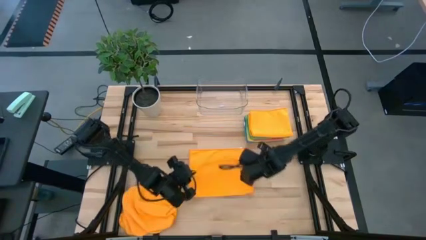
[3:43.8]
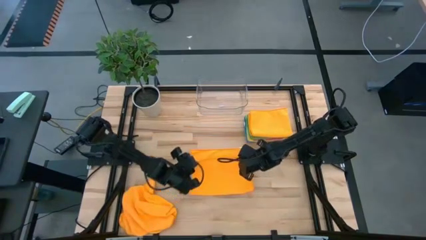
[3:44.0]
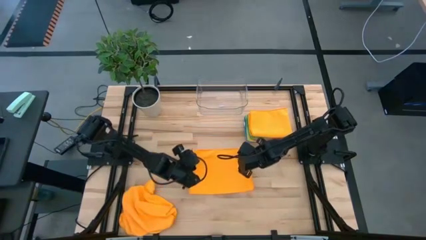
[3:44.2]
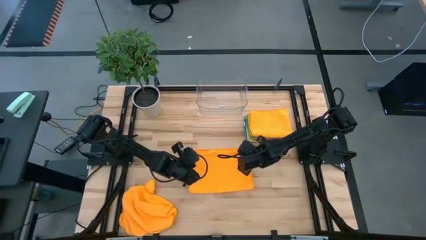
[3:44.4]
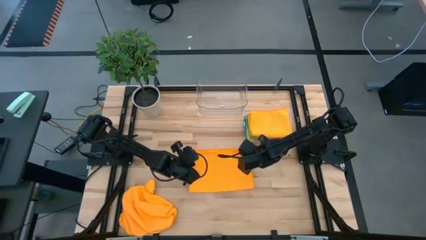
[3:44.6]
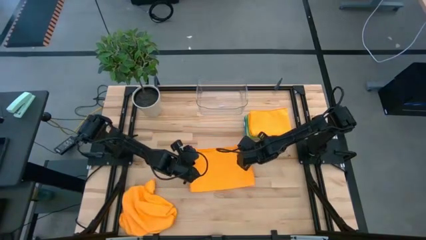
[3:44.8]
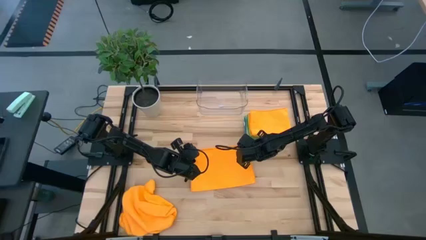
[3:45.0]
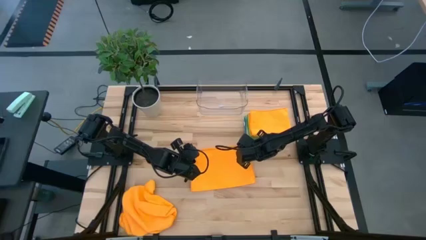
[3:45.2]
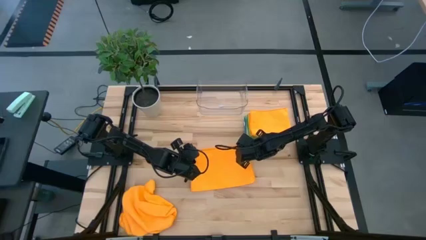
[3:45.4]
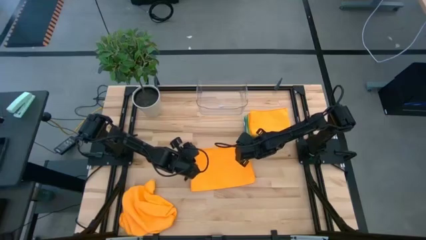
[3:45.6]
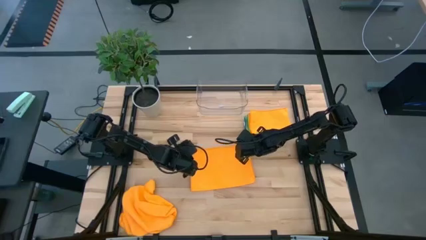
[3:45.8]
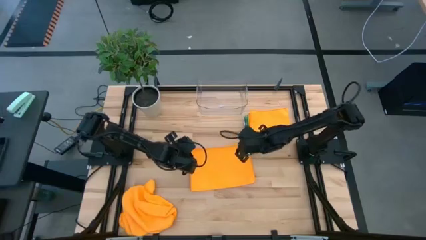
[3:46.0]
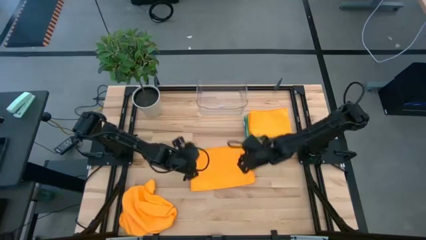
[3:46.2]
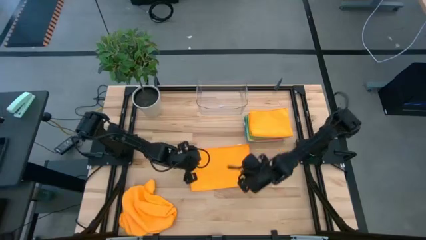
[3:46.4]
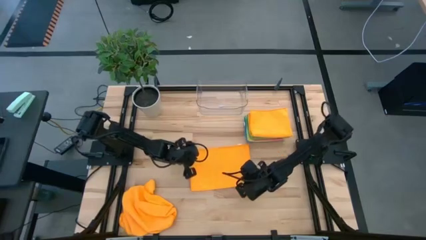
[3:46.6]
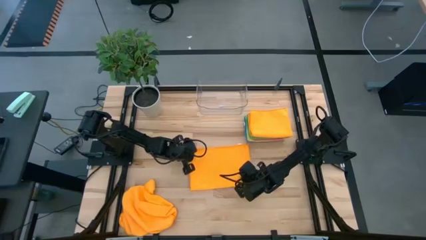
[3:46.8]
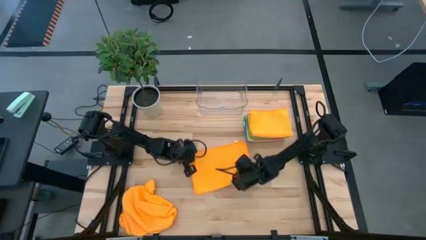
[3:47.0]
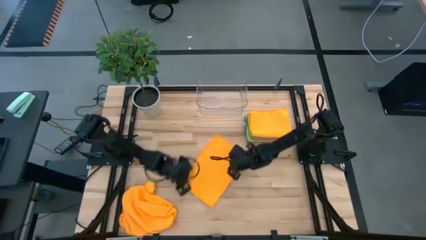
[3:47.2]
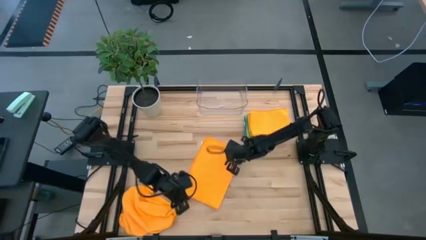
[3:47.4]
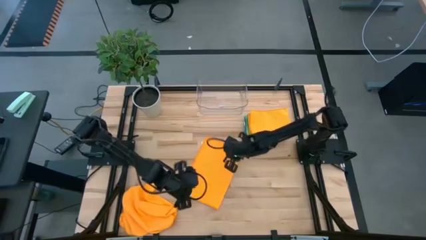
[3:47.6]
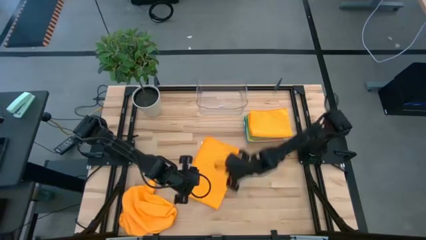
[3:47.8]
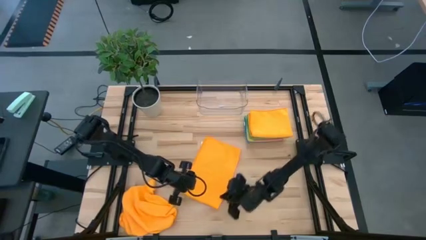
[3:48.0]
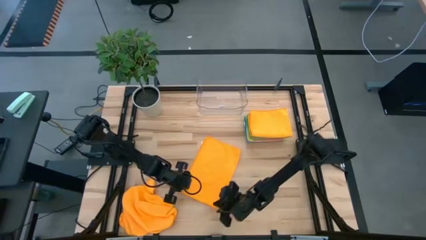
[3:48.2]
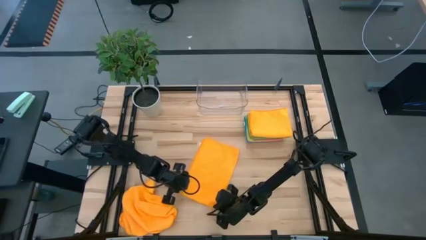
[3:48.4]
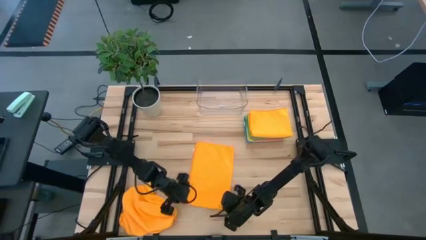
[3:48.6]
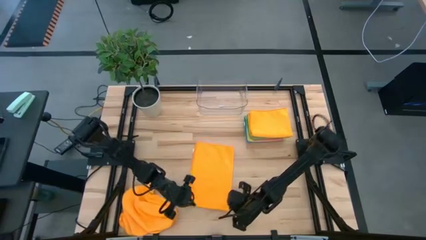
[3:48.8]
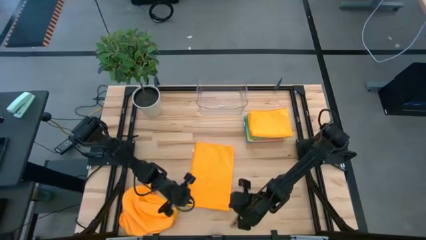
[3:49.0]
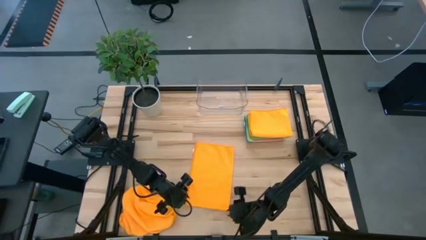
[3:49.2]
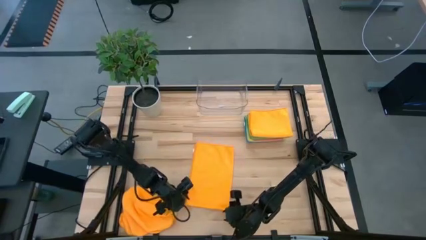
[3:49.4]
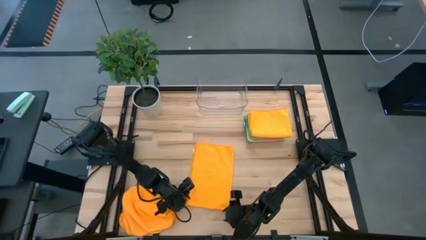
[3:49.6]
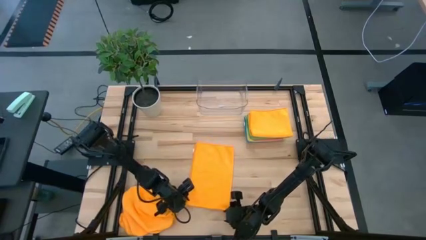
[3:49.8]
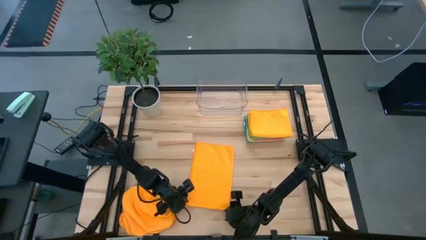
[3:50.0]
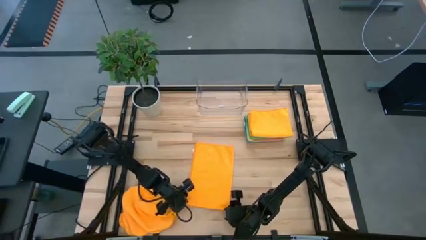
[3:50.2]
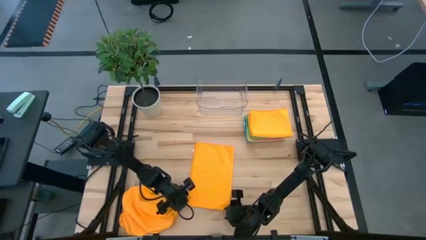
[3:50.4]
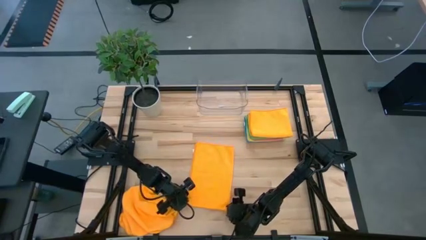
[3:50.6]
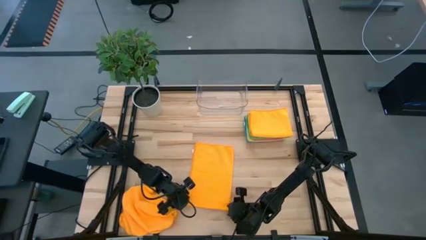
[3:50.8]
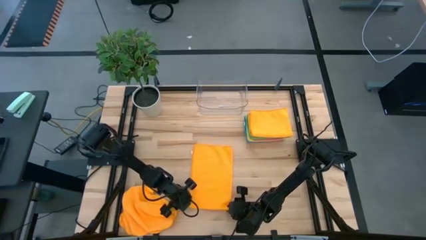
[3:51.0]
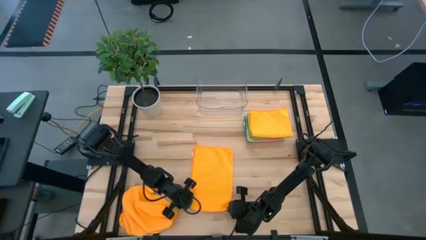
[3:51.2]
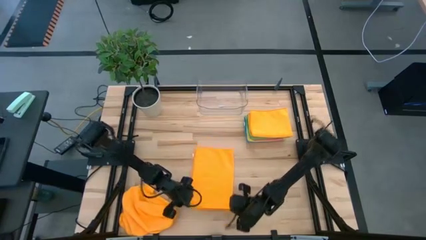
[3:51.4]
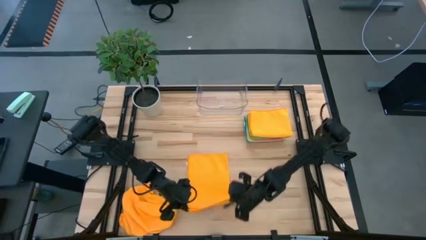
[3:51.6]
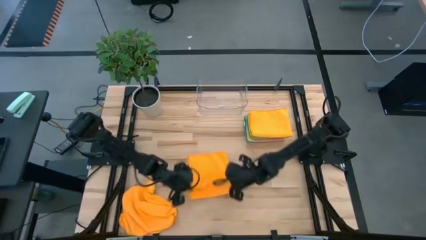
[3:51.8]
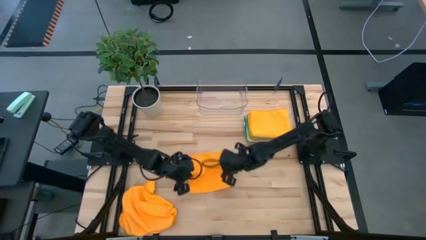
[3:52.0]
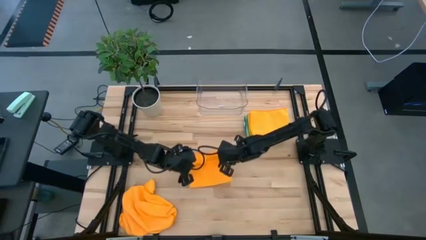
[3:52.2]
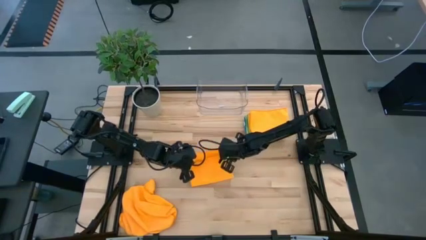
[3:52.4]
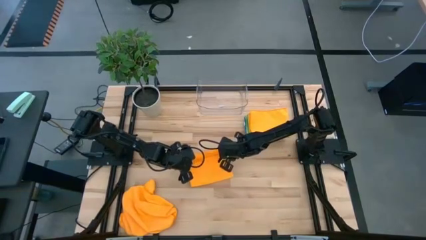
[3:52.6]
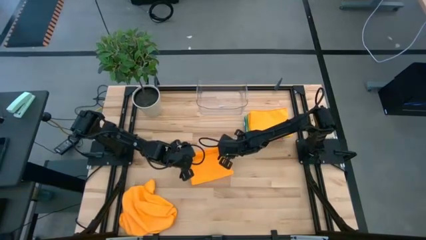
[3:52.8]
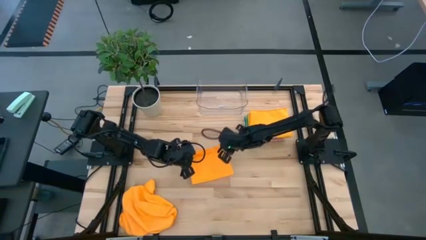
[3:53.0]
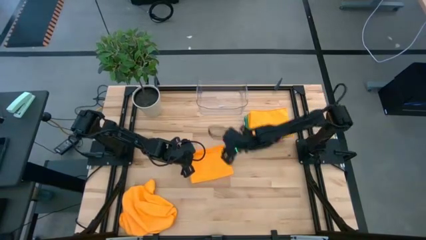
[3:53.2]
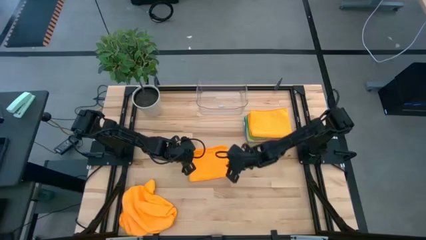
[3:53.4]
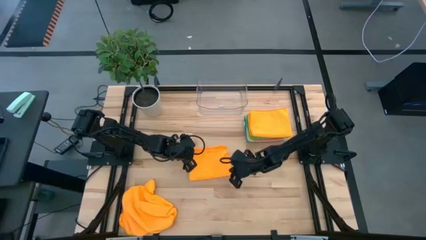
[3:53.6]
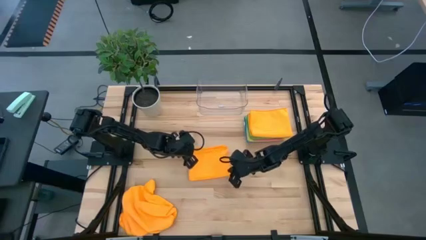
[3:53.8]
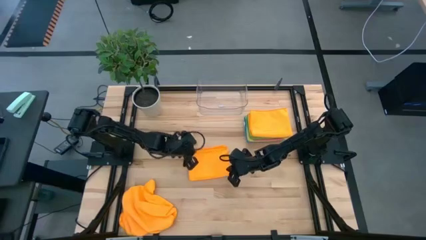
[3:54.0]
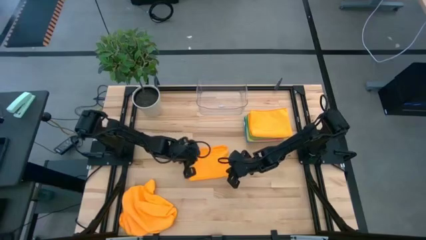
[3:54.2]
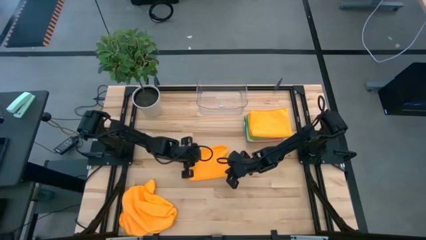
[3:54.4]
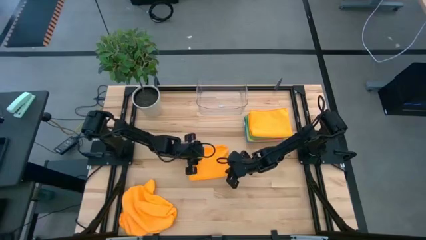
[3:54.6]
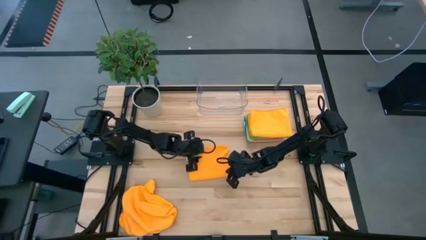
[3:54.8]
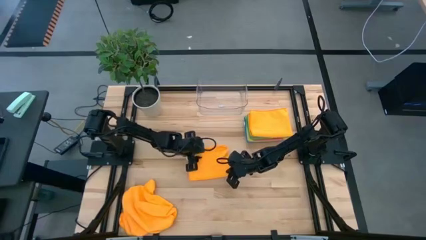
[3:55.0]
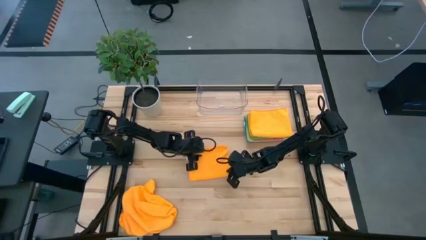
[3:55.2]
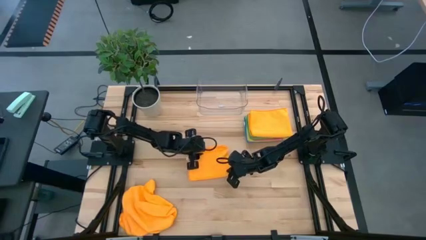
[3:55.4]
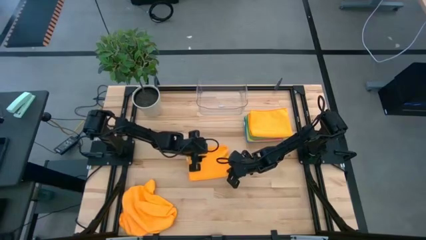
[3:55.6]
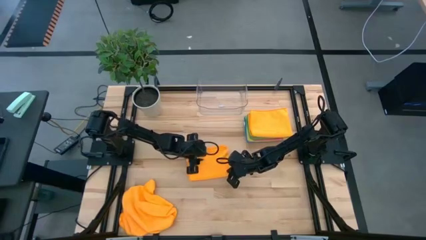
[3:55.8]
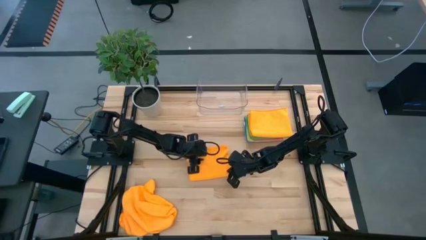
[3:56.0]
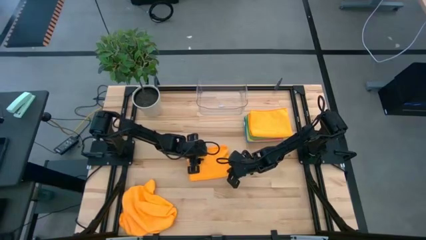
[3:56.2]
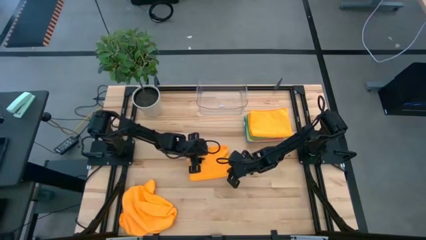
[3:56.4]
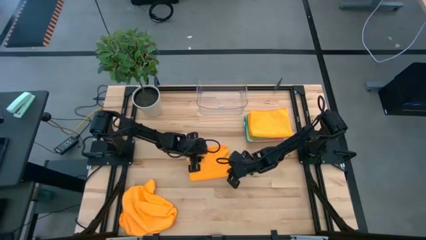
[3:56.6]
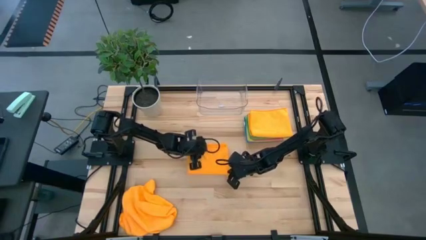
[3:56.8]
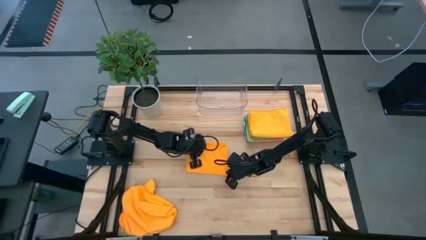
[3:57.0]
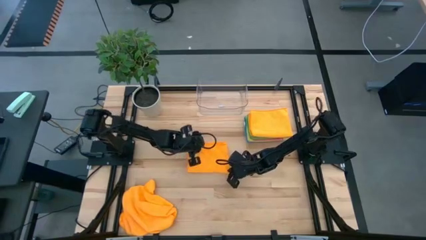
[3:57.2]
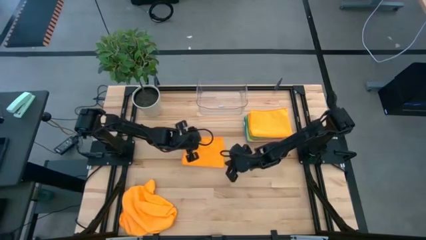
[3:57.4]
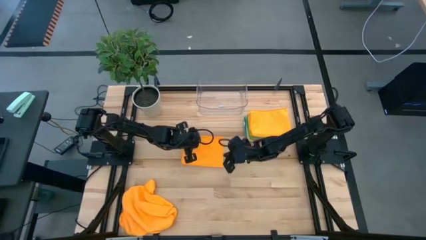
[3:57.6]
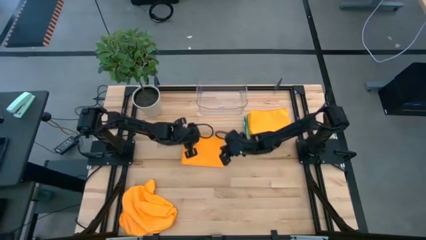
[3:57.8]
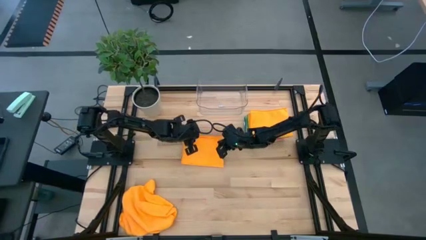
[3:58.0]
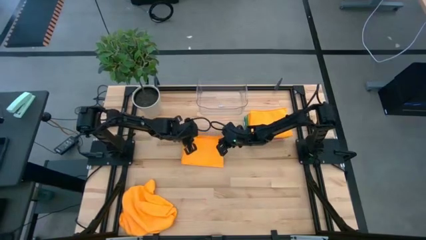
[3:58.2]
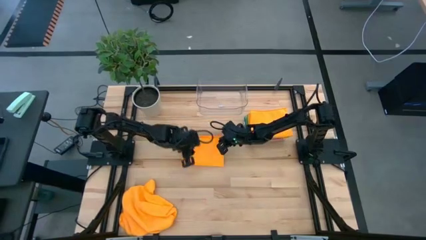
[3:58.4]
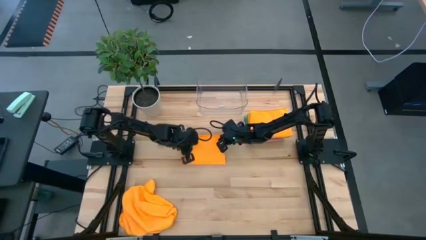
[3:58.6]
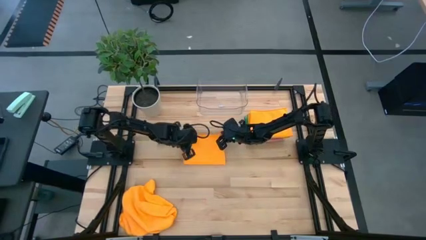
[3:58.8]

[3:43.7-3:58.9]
Task: Fold microfiber towels
Fold the top orange towel

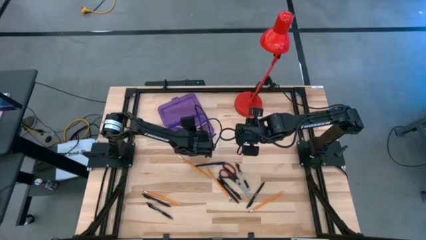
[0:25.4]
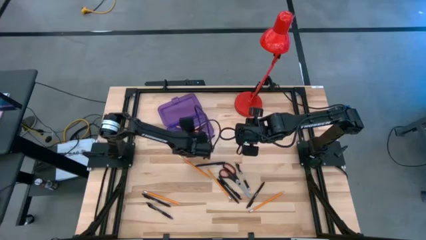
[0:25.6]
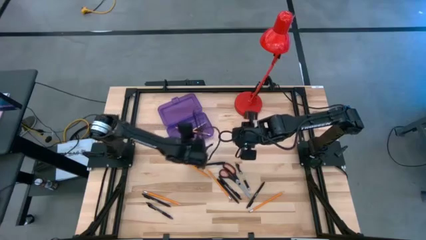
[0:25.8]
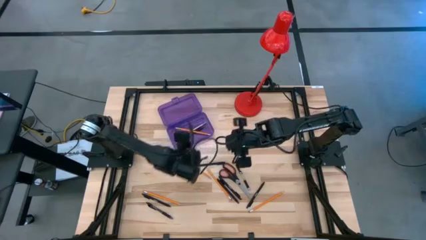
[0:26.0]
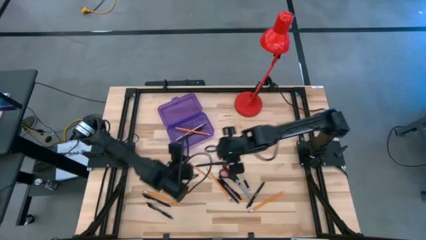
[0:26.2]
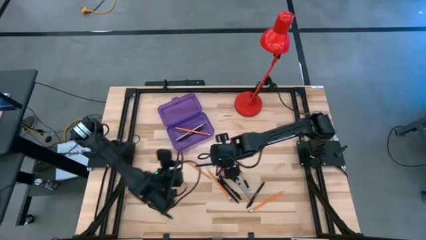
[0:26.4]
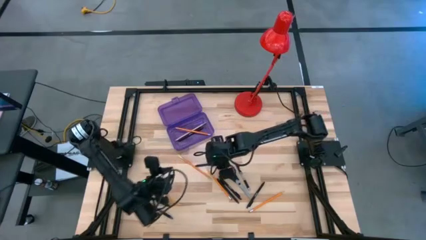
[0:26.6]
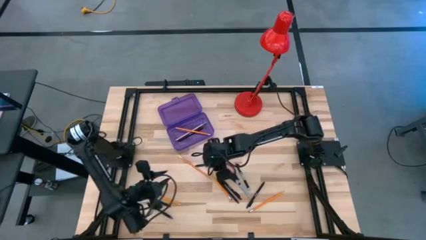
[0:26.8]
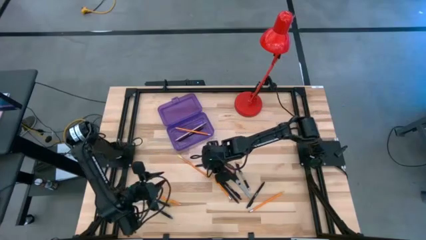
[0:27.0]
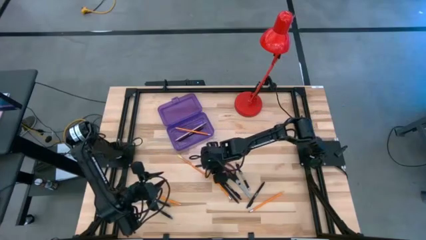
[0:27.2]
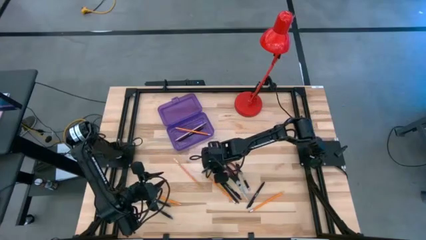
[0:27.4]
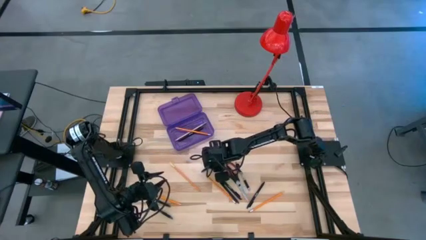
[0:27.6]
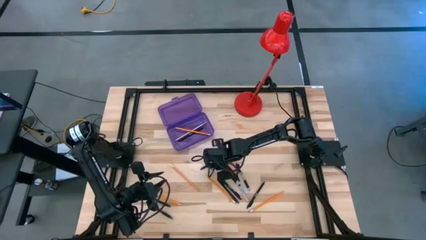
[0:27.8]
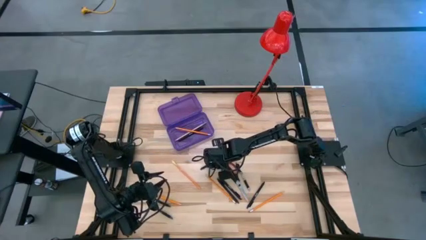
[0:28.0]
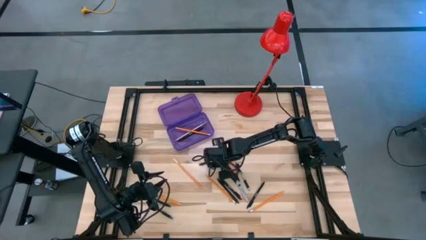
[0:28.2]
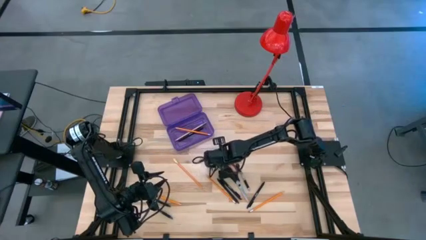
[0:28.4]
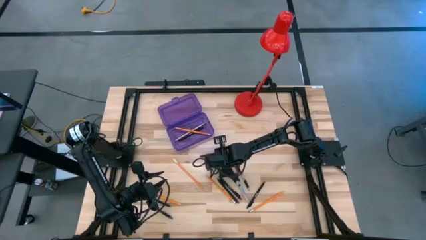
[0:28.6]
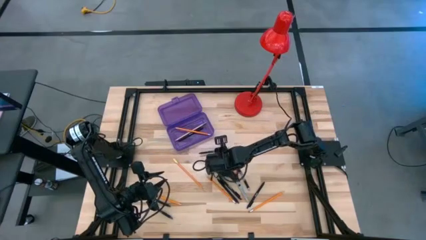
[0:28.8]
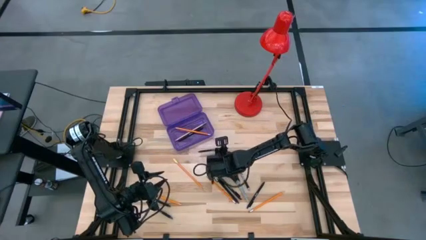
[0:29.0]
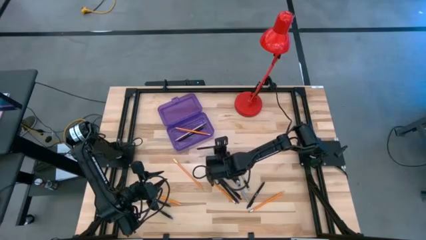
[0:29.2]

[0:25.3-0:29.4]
Task: Pick & place school supplies into a supply box
Put the black pen into the purple supply box
